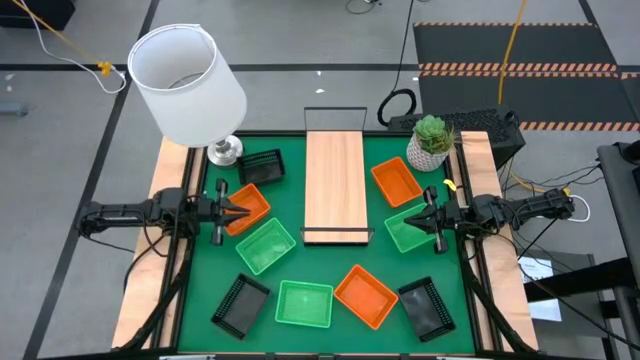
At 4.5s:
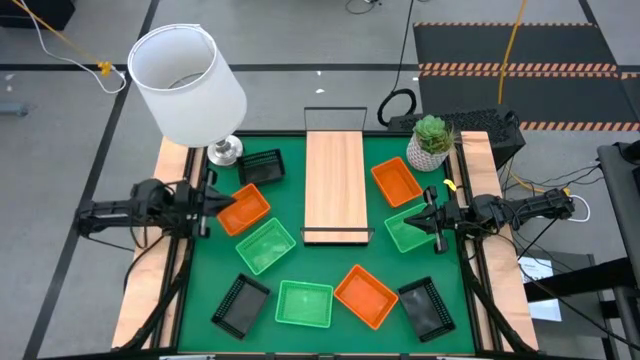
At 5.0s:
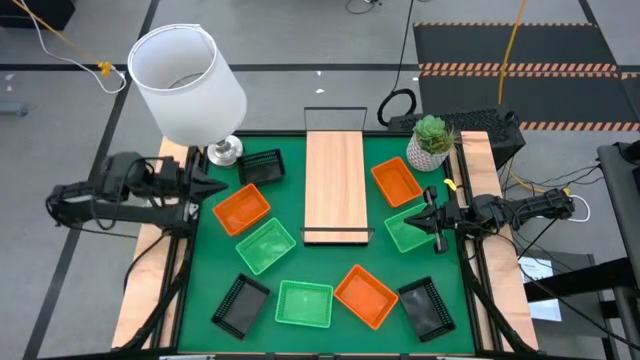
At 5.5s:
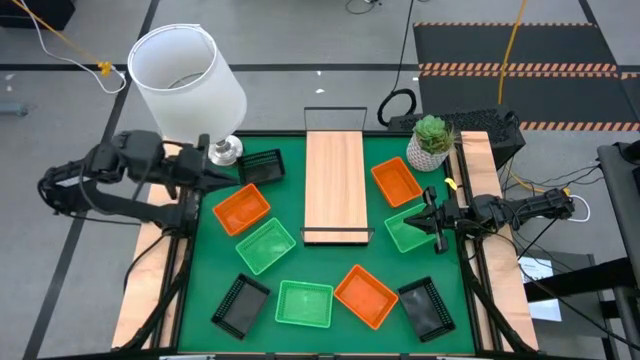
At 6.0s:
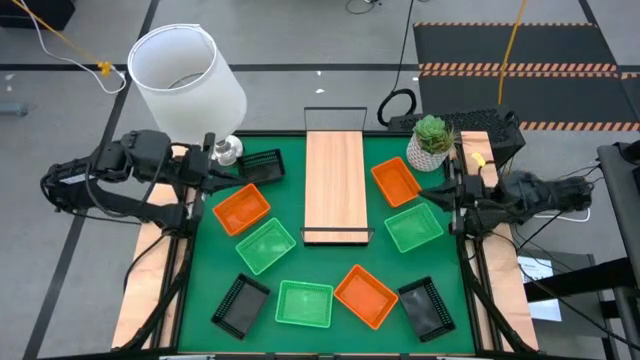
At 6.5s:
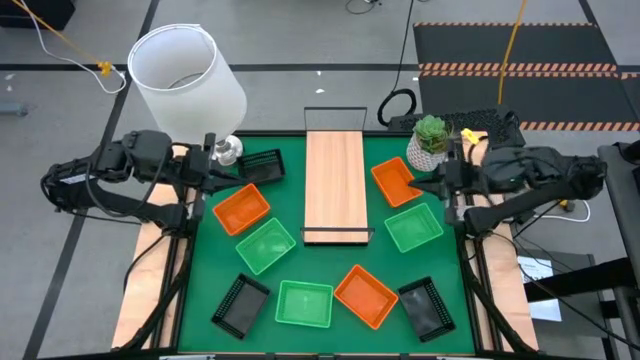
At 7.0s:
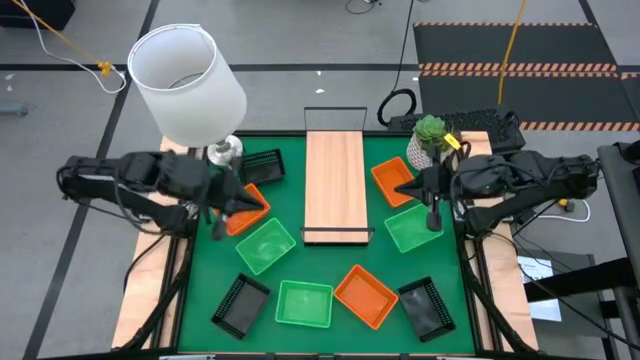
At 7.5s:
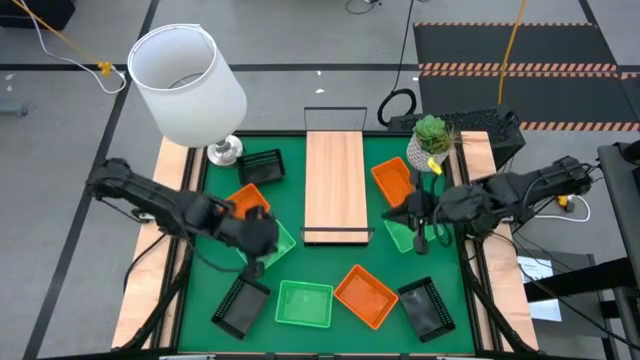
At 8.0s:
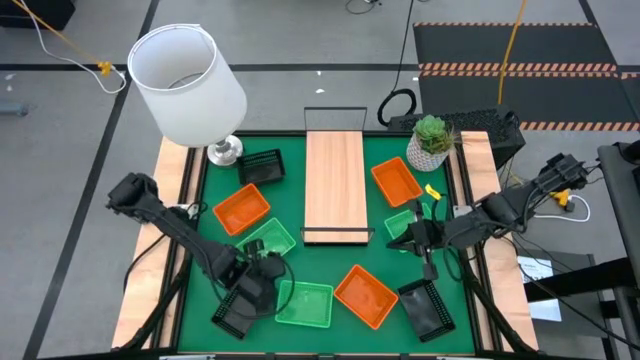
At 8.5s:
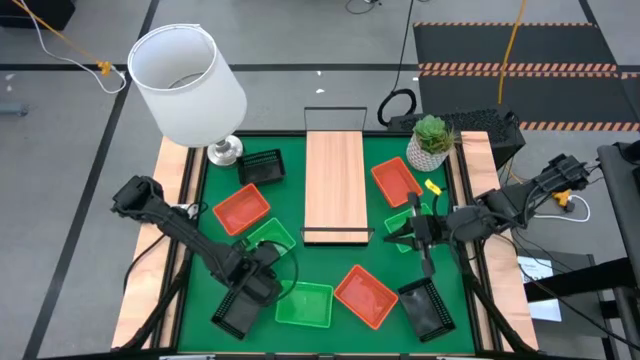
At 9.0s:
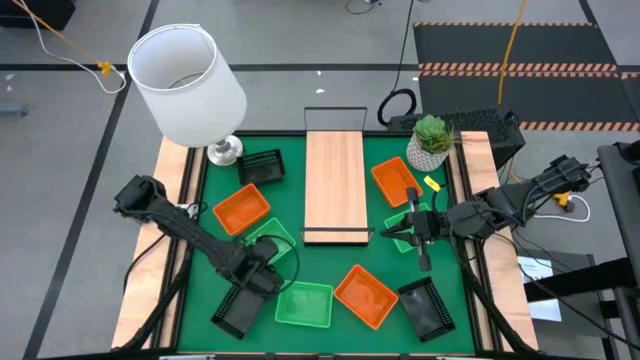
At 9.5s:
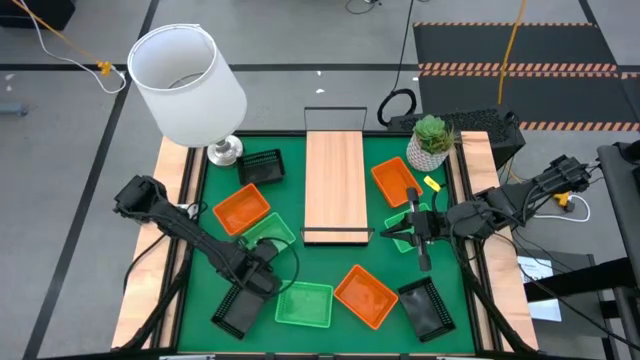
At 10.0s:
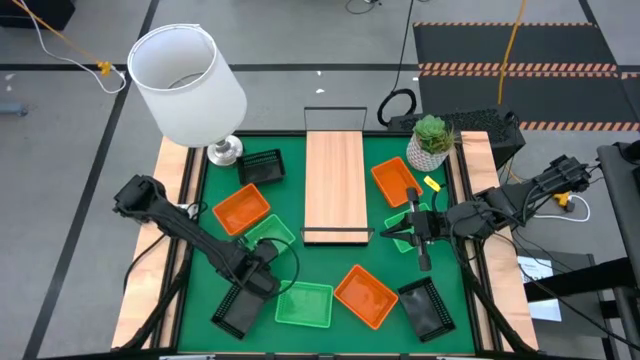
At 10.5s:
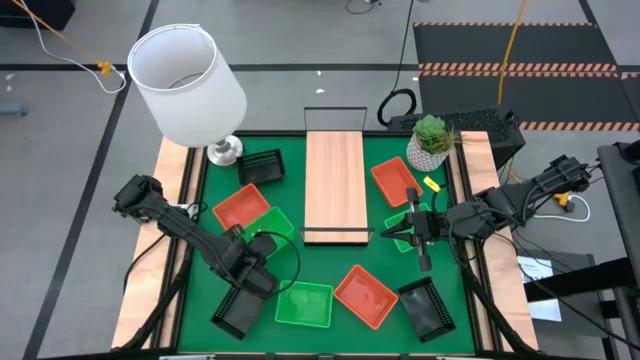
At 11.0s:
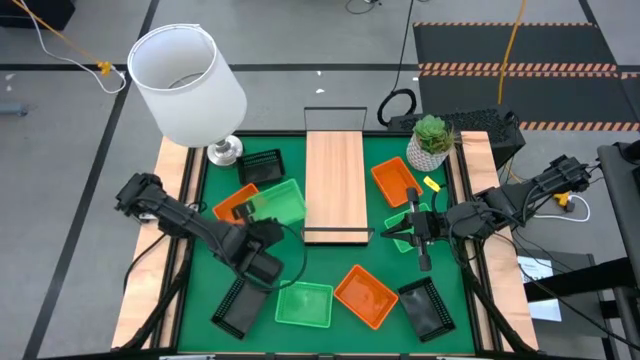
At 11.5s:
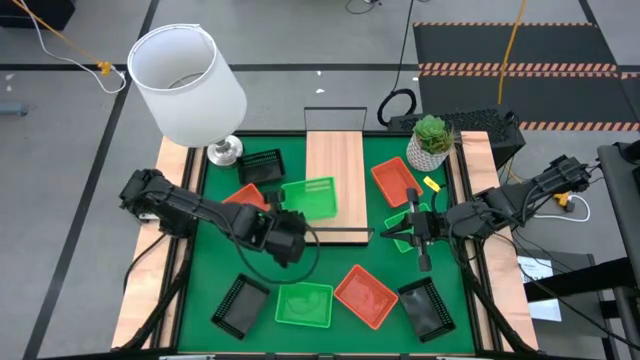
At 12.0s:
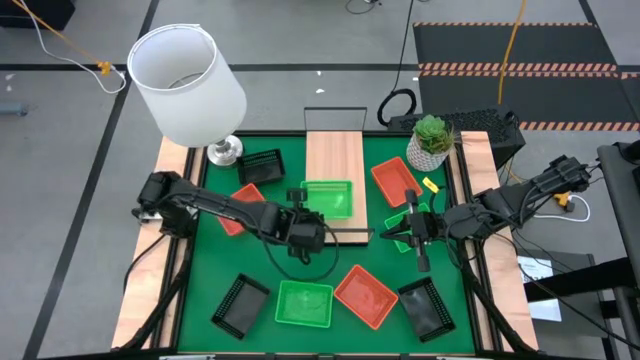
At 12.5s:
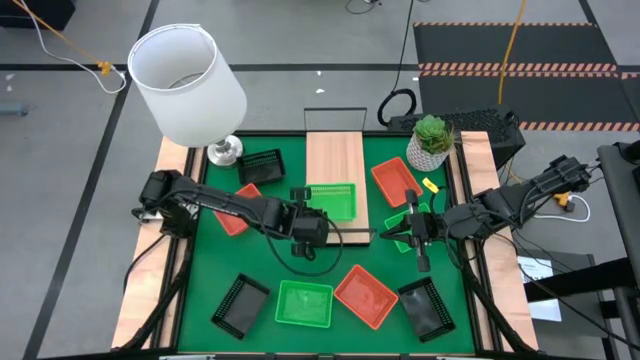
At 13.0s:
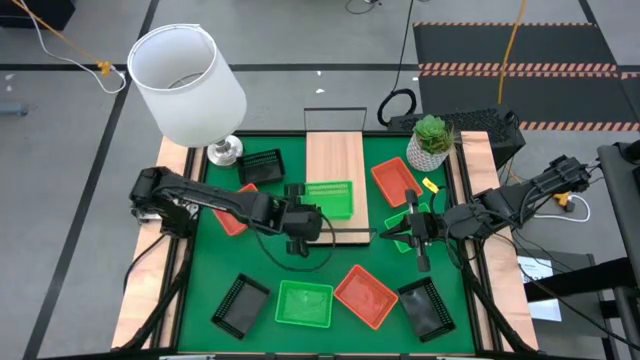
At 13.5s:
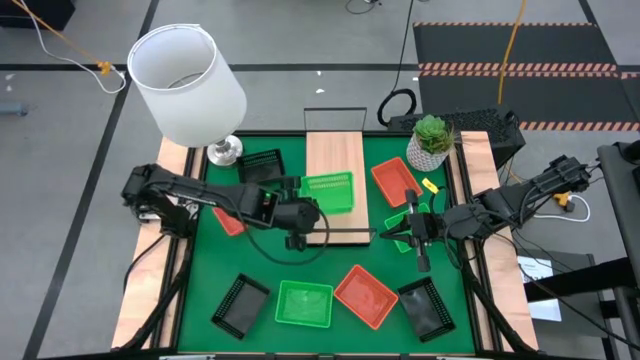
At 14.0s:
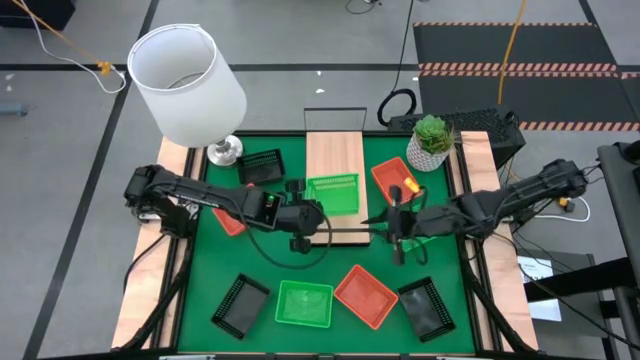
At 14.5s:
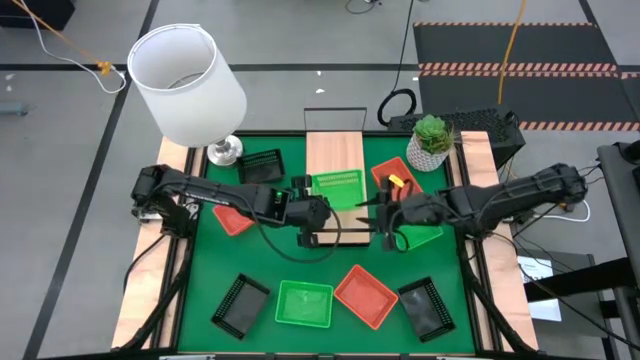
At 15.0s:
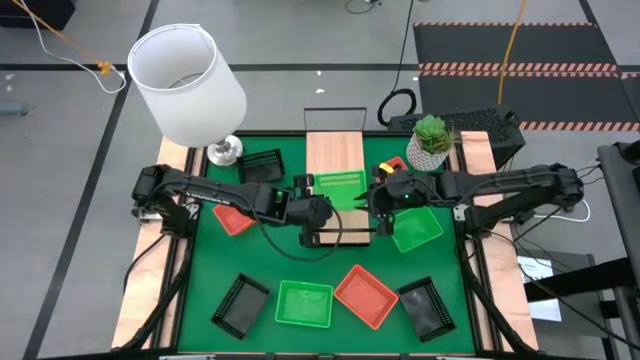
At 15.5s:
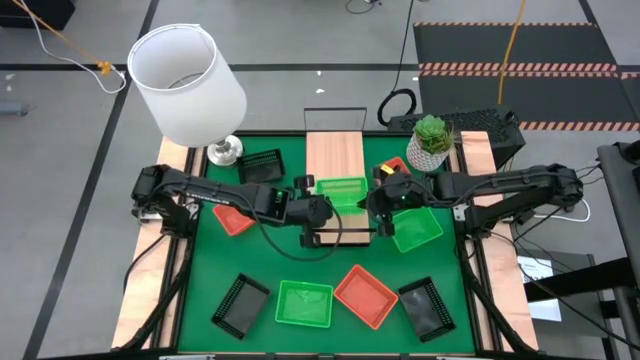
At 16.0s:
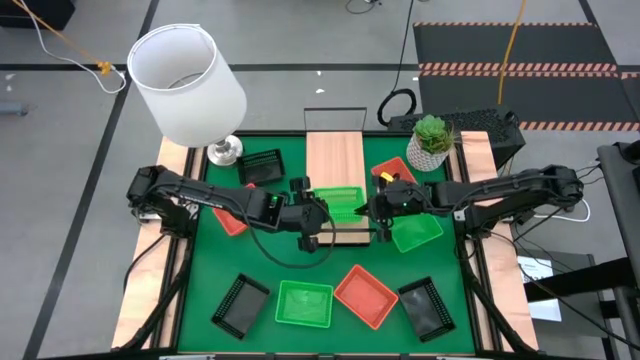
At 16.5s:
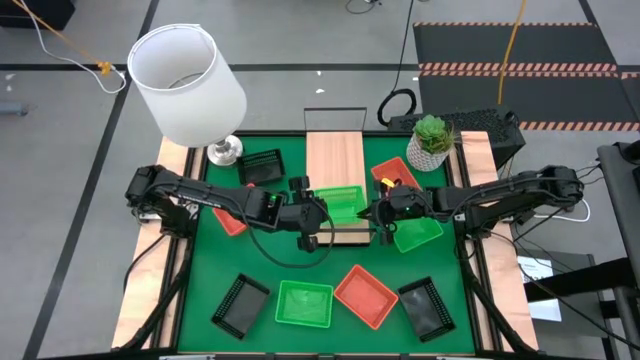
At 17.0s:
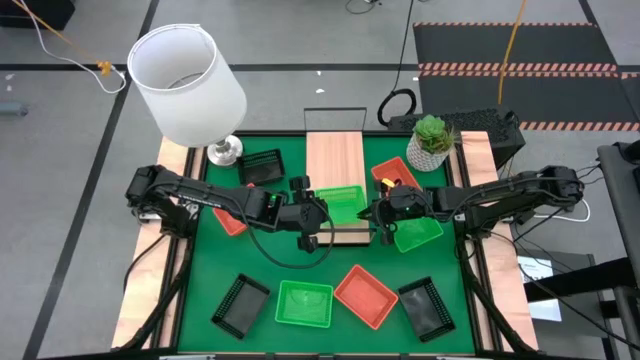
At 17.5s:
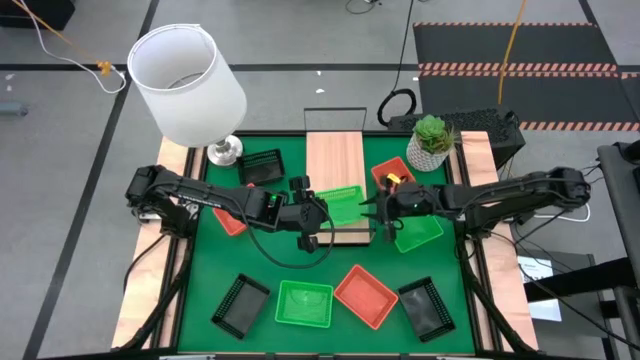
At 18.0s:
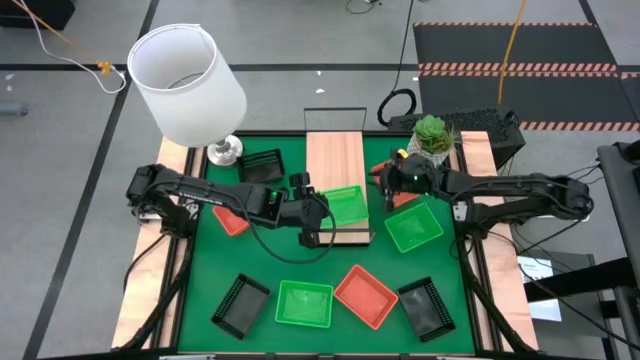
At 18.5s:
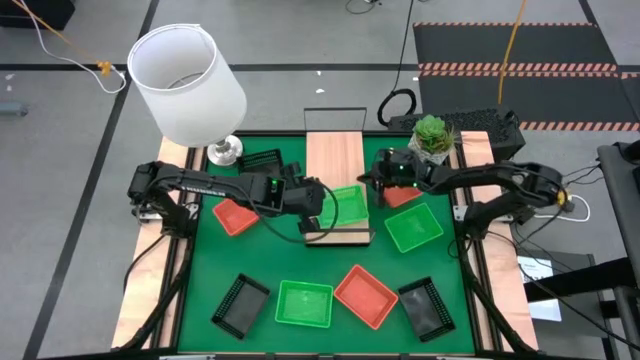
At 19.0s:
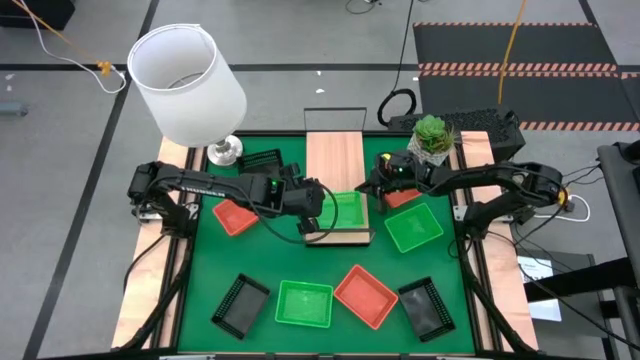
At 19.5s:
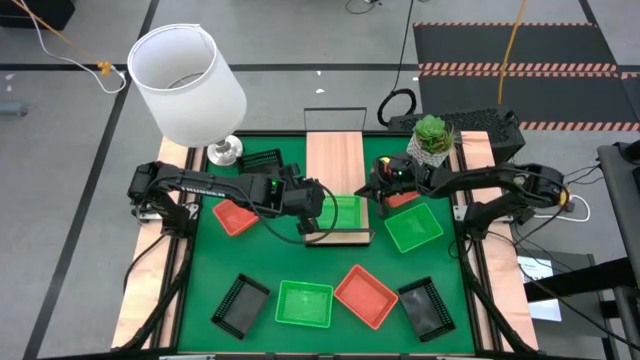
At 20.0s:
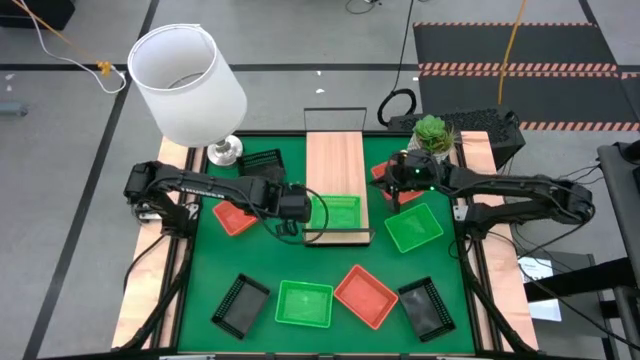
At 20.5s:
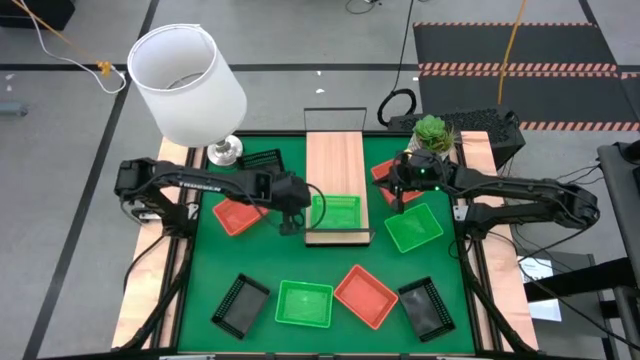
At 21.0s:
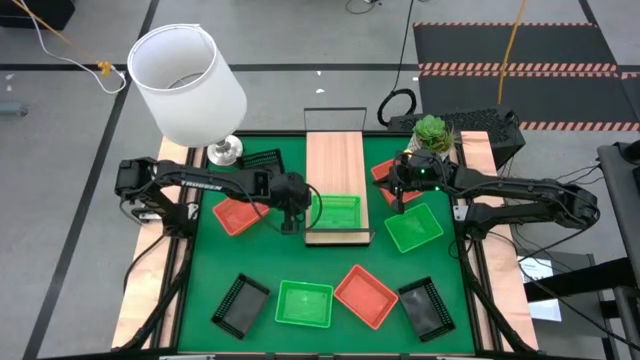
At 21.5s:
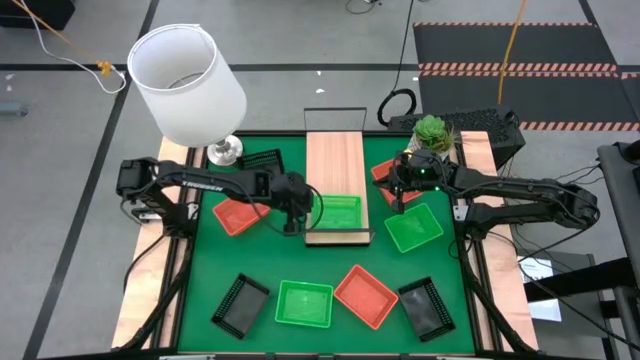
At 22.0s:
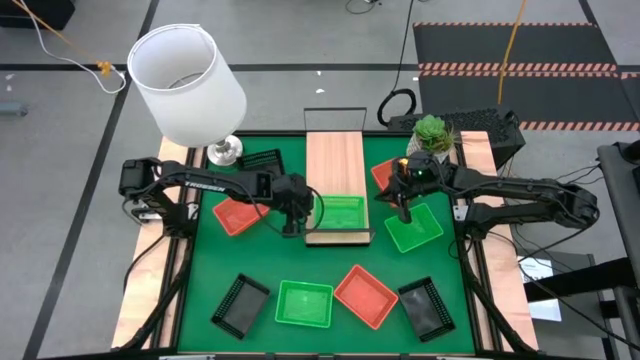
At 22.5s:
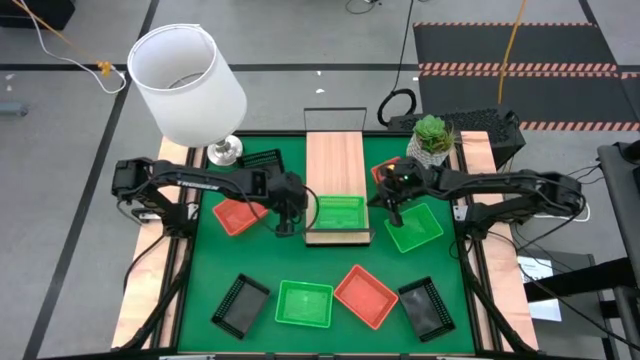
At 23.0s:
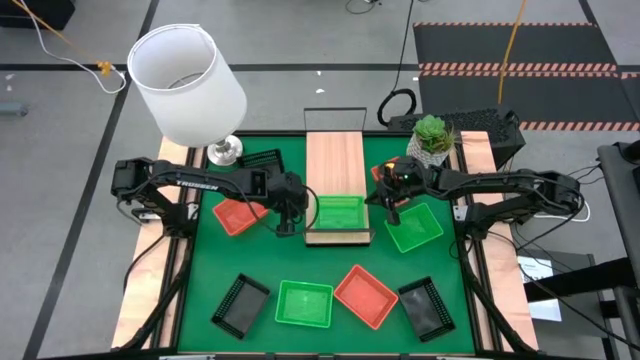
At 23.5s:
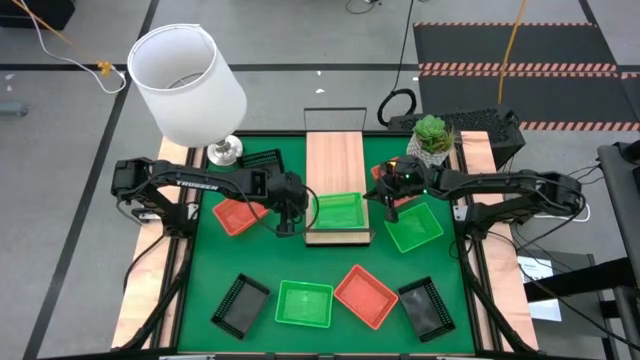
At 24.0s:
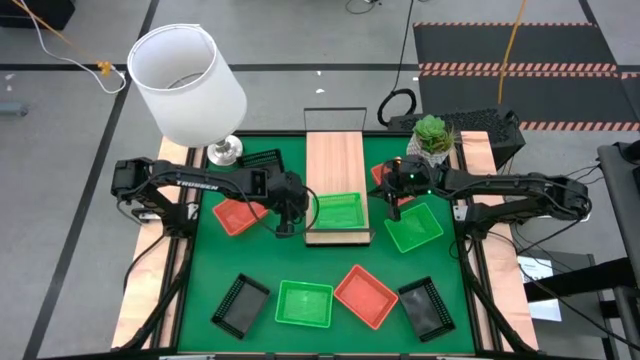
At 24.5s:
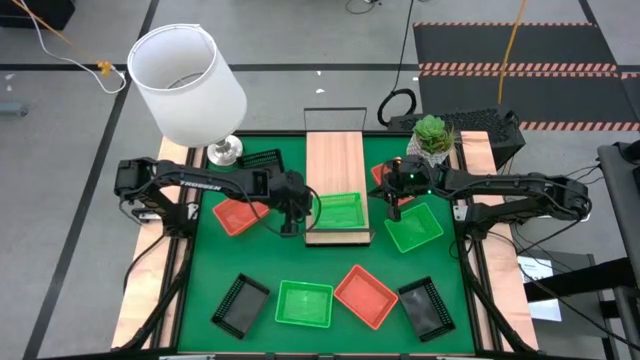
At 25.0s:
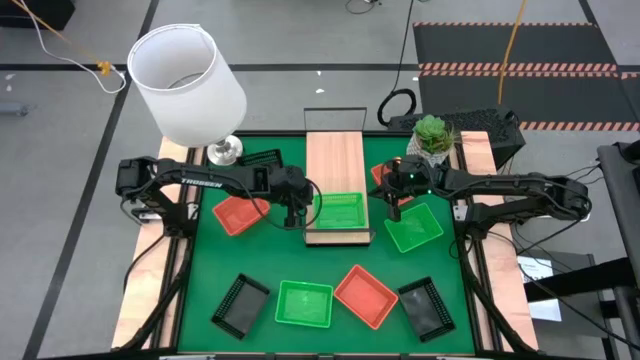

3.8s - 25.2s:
Task: Stack baskets on shelf by color
Put the top left green bin on the shelf
